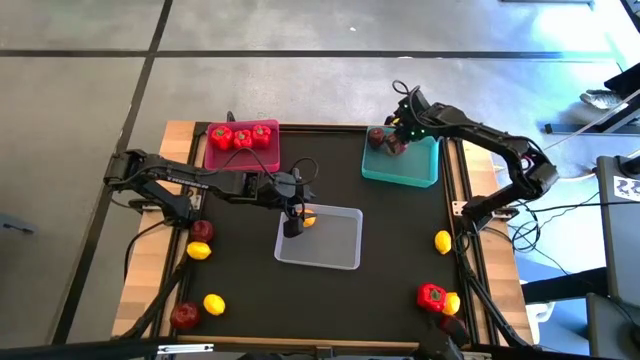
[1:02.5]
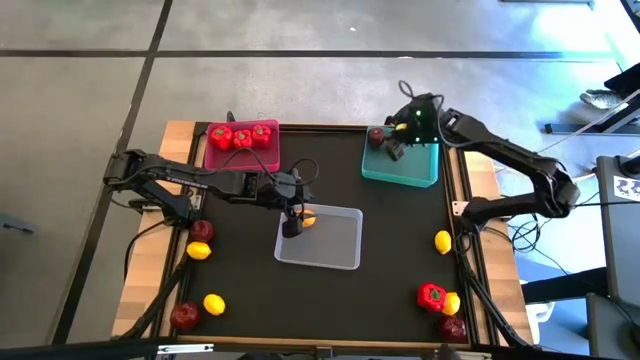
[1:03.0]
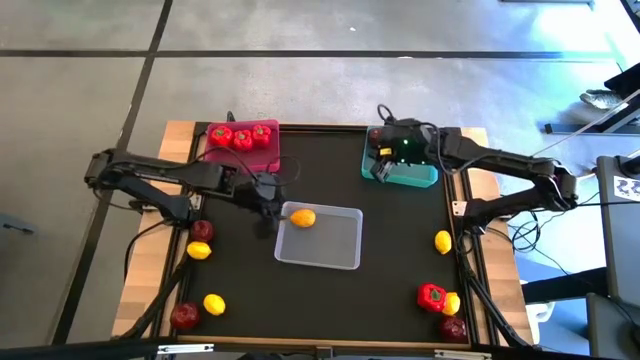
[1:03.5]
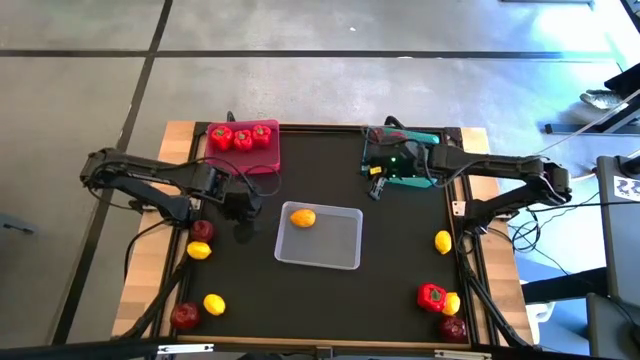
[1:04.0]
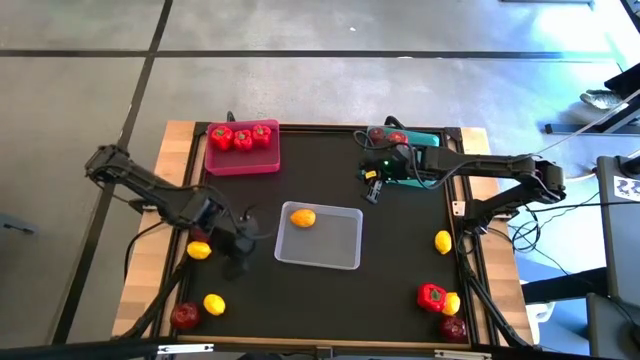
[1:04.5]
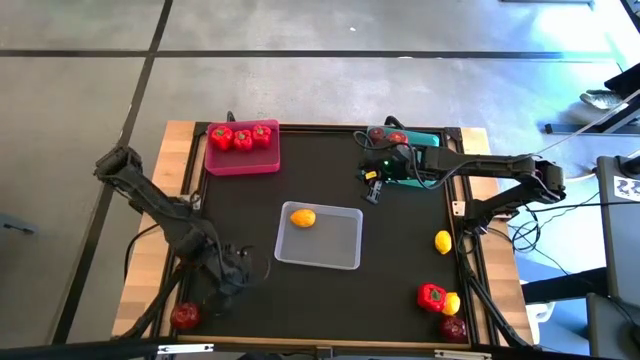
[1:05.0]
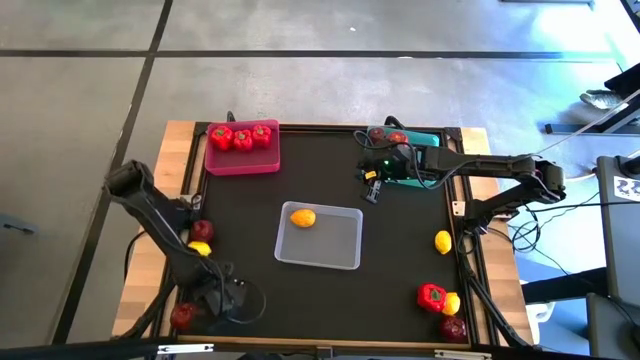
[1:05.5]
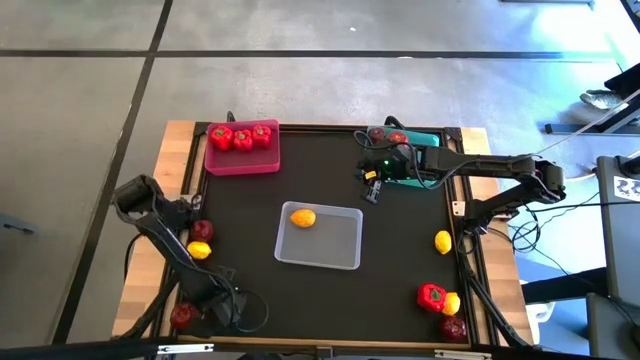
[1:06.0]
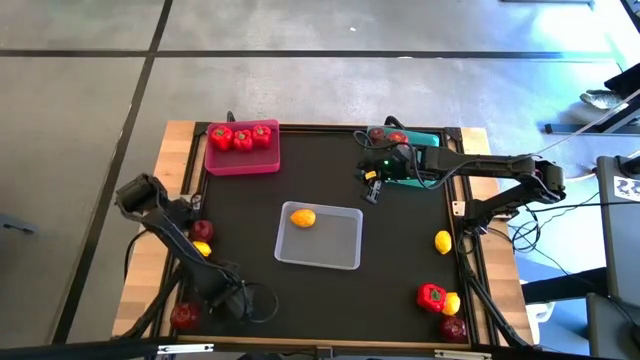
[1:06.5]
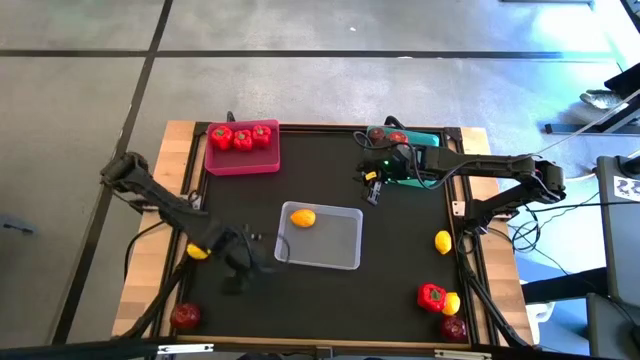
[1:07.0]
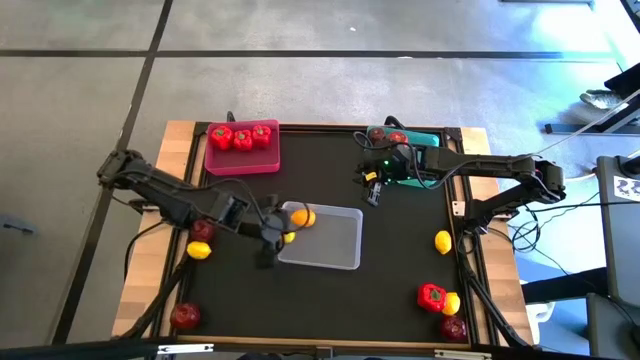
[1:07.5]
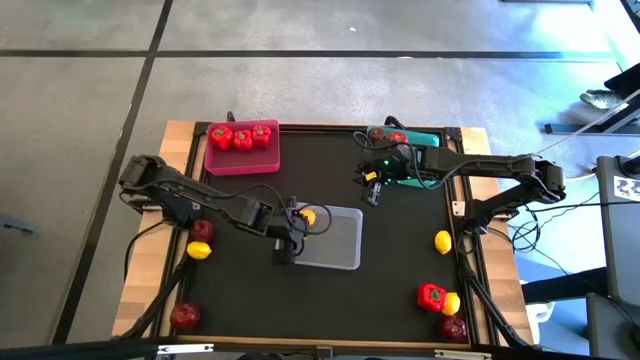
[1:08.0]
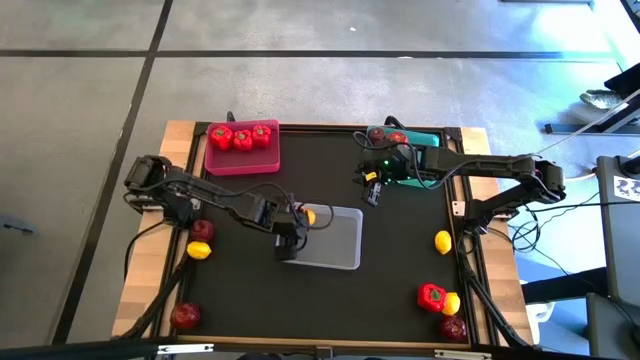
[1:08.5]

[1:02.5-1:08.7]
Task: Sort produce into baskets
Put the lemon into the white bin

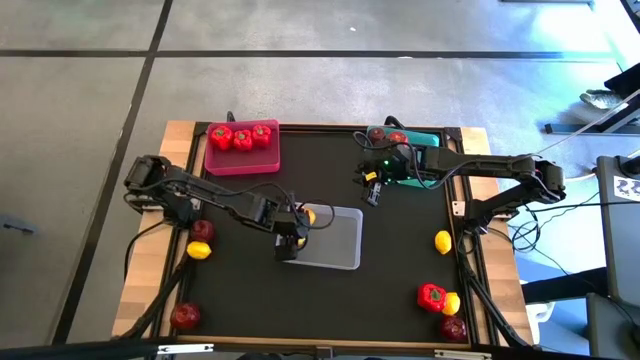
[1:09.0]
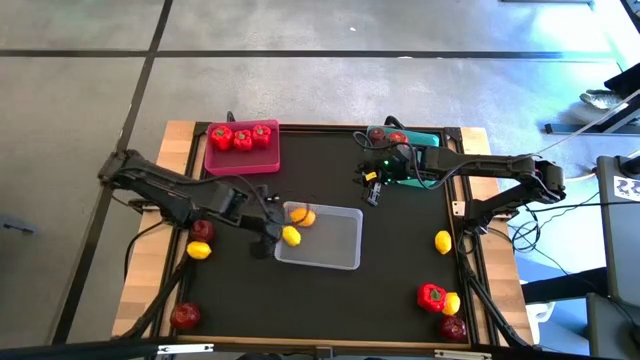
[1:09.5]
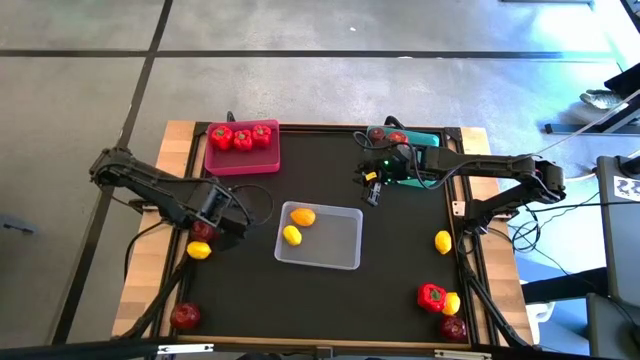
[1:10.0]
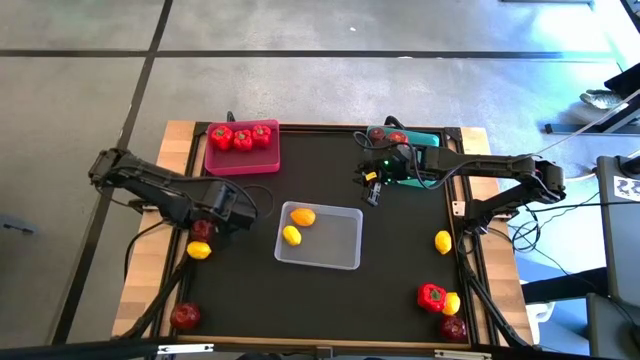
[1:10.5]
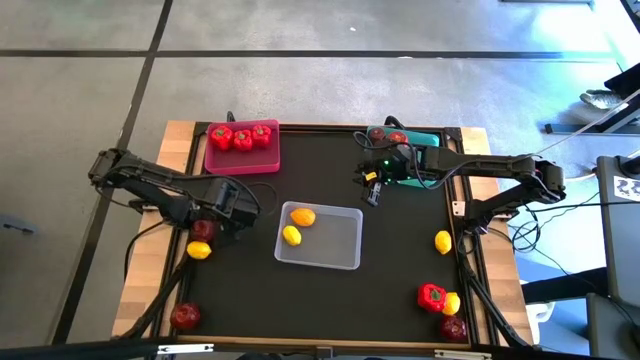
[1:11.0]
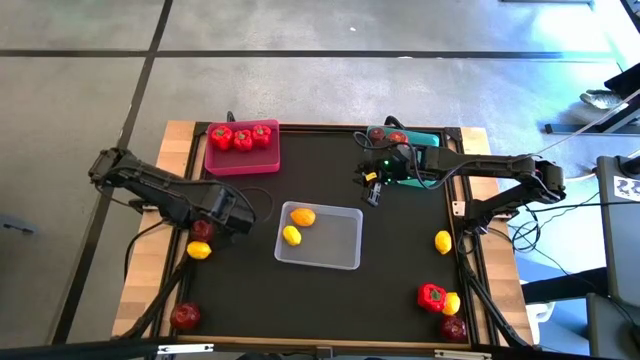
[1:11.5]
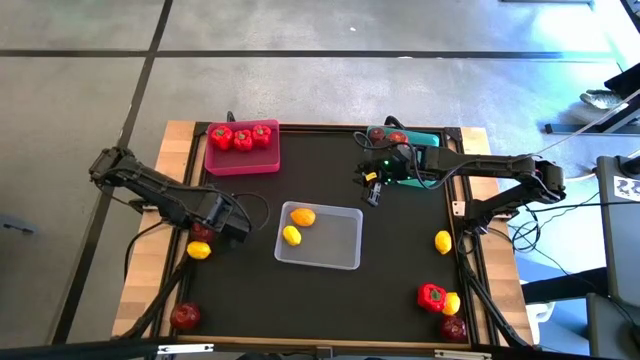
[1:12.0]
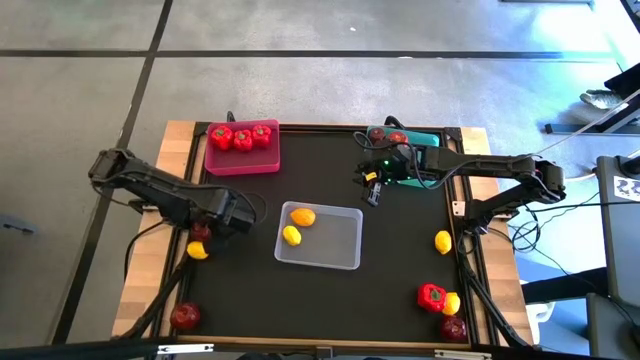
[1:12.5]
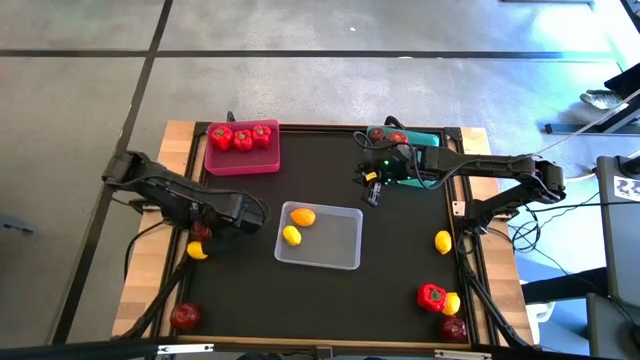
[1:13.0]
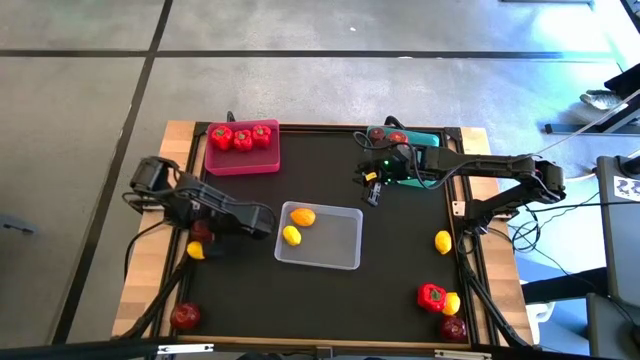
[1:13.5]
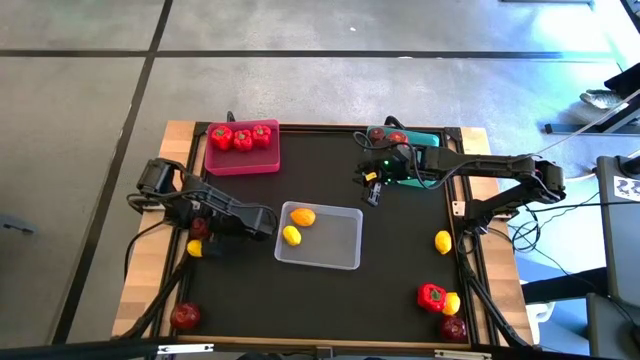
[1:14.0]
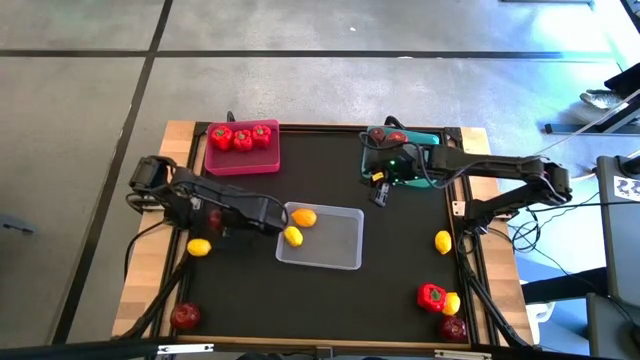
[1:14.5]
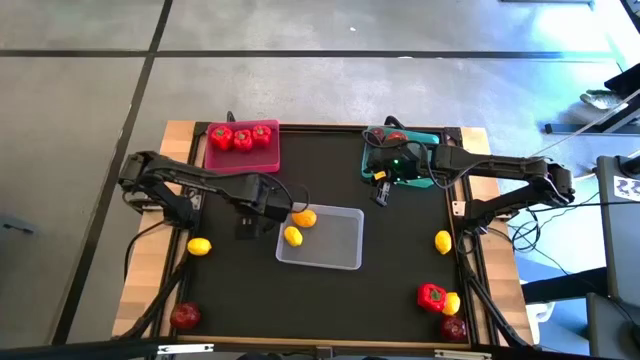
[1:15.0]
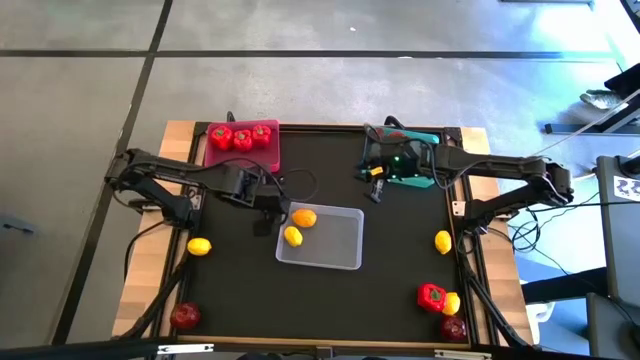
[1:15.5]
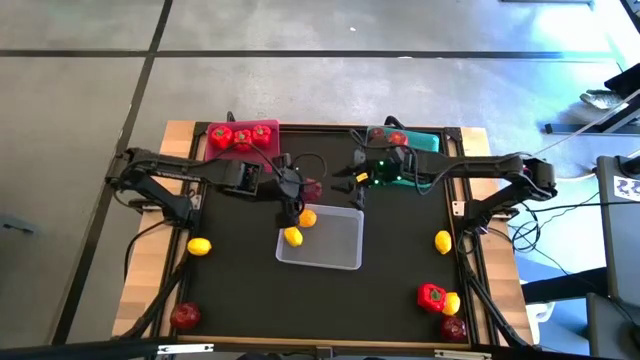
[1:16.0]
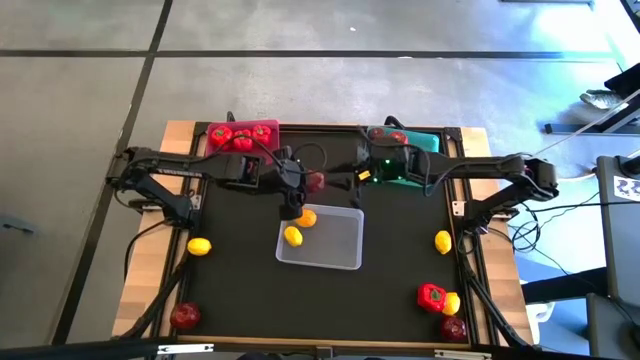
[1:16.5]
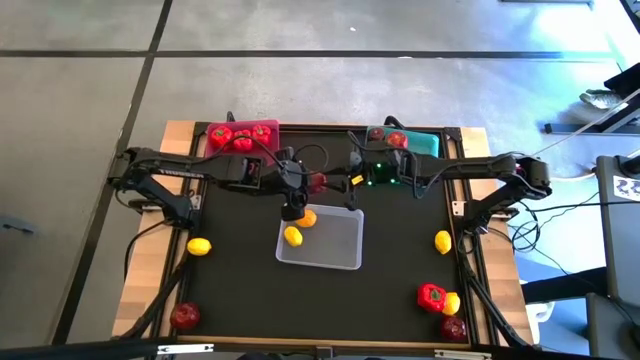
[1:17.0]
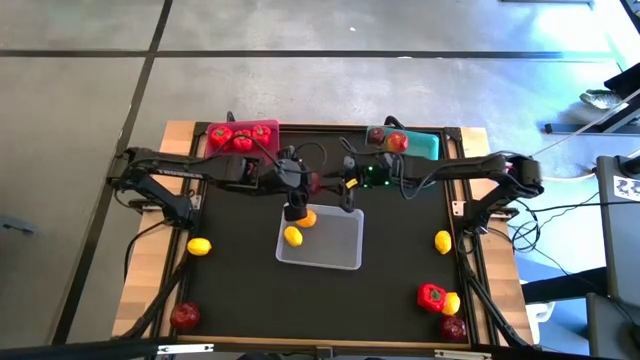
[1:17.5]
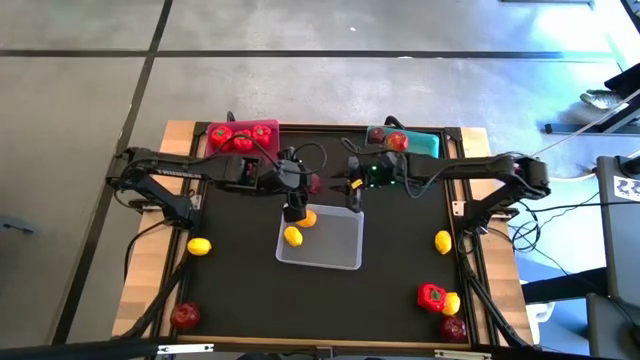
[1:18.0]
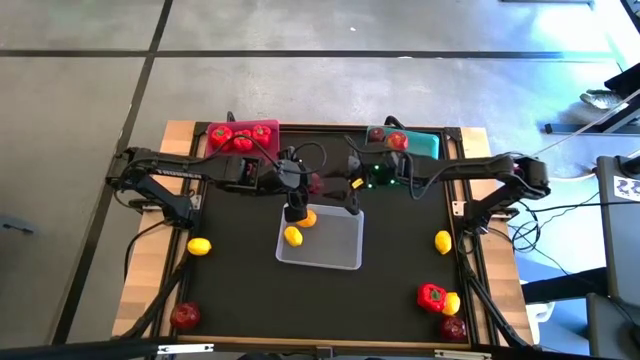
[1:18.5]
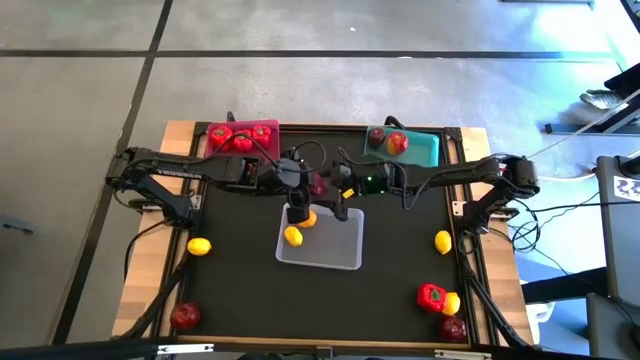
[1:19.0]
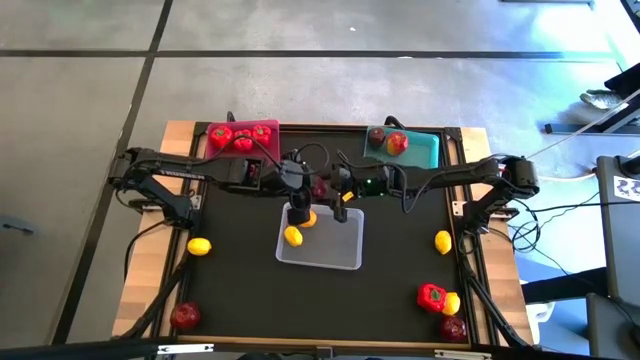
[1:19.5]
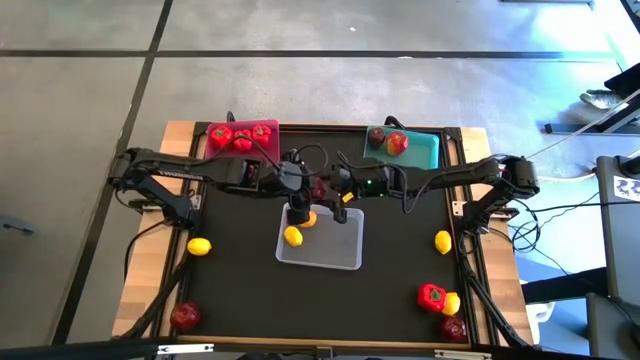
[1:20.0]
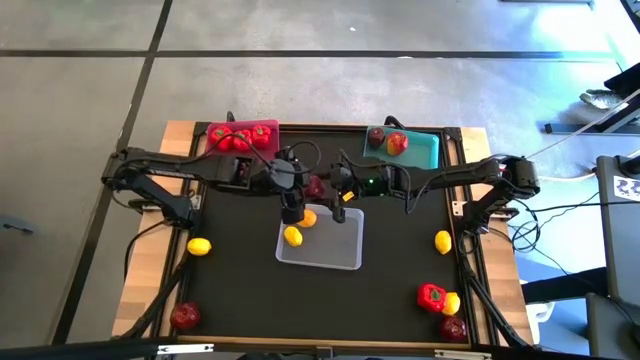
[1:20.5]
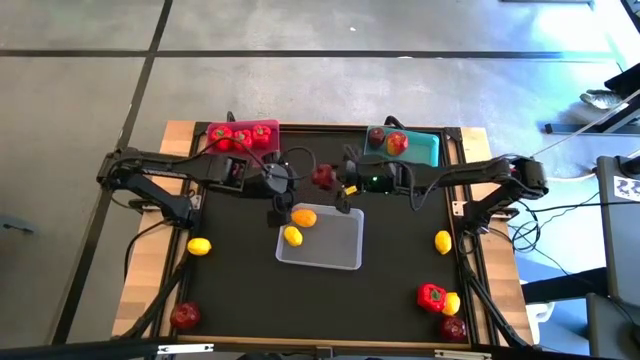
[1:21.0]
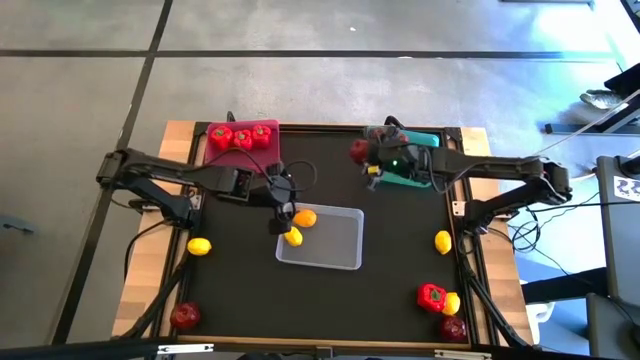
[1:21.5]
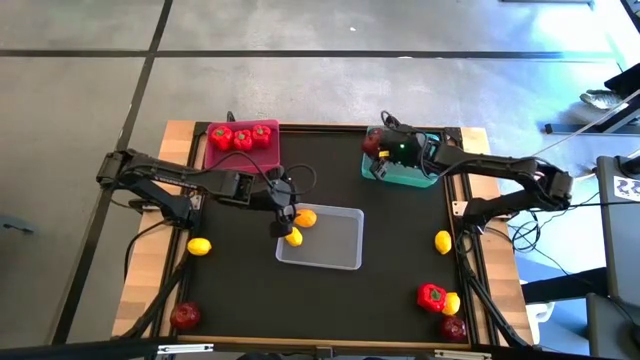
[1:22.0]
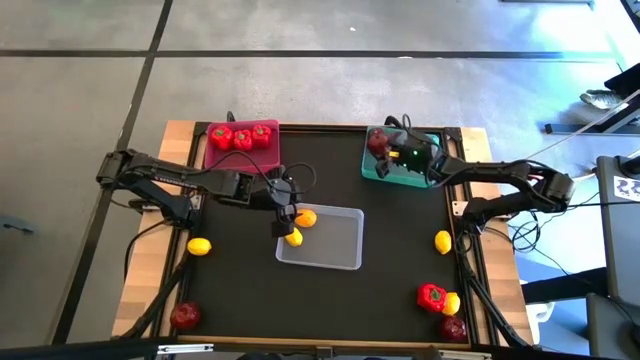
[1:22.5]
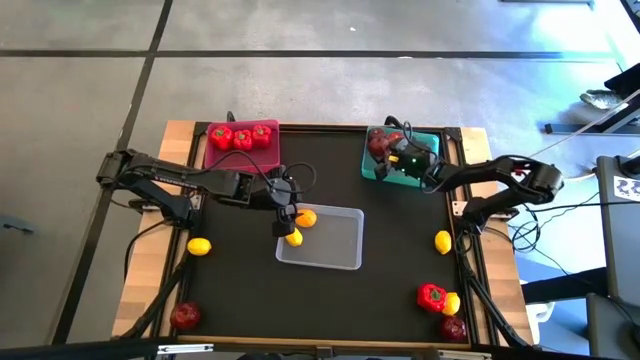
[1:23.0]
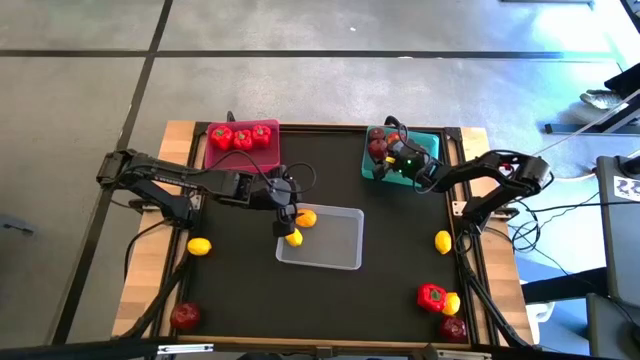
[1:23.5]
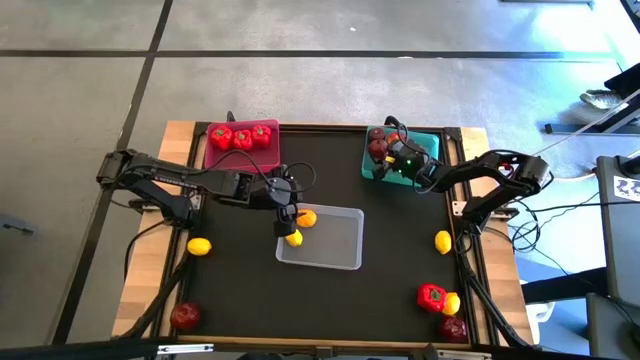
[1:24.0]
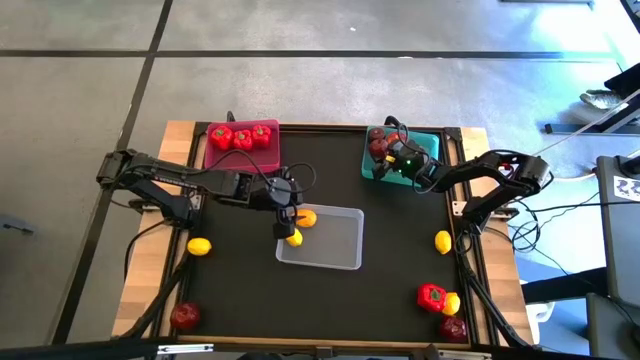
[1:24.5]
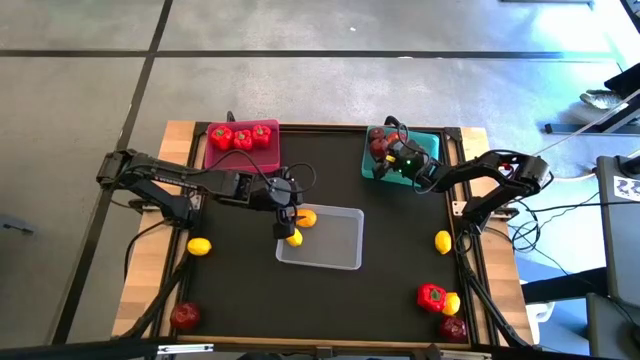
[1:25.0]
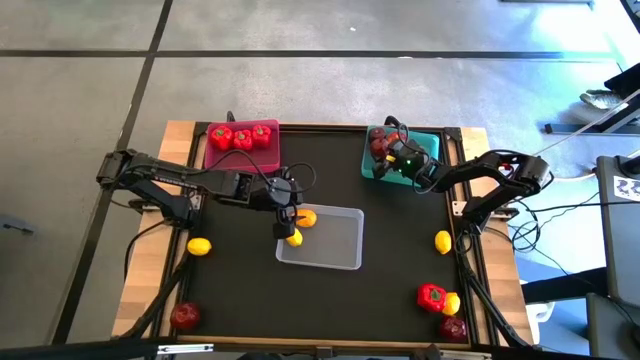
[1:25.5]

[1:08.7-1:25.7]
Put the apple into the blue bin
